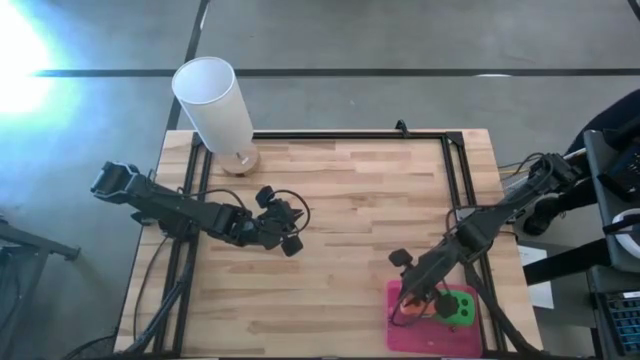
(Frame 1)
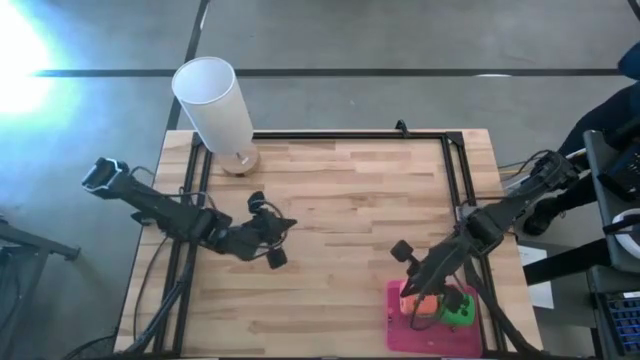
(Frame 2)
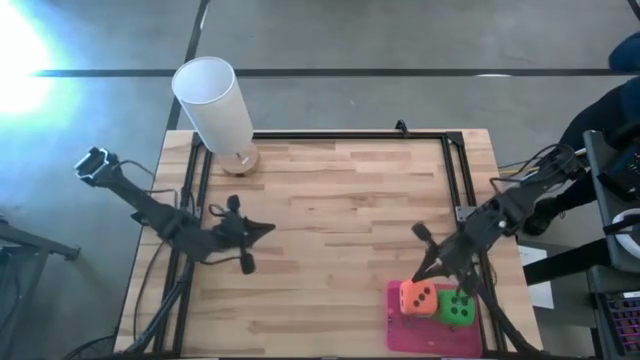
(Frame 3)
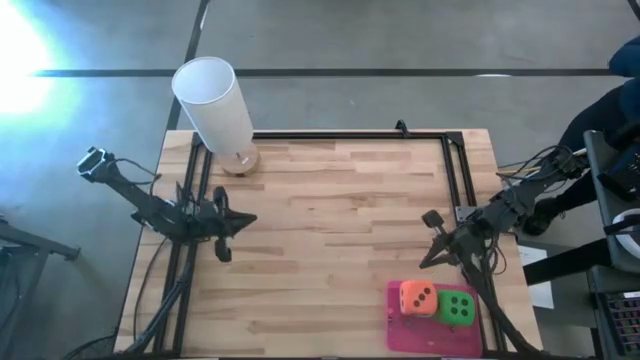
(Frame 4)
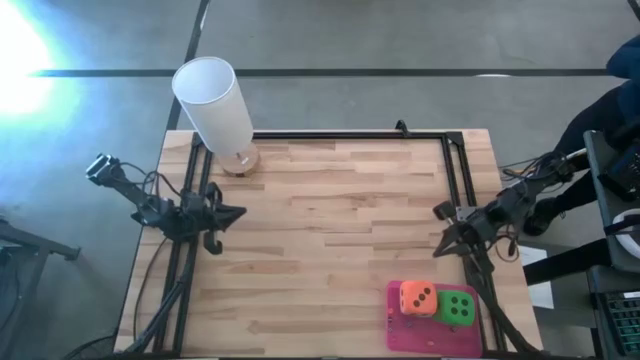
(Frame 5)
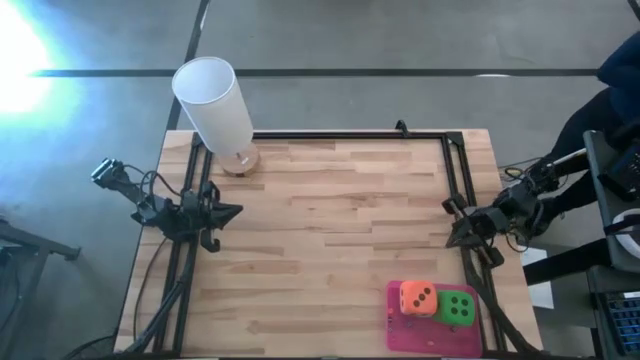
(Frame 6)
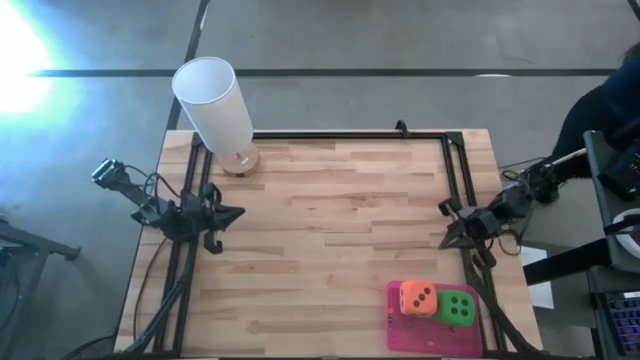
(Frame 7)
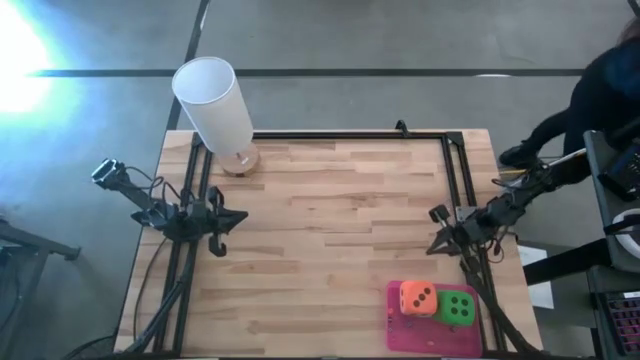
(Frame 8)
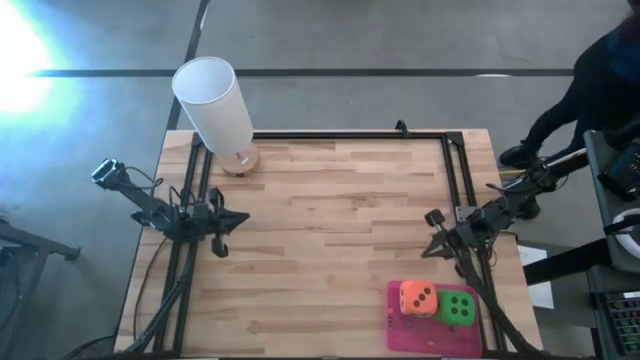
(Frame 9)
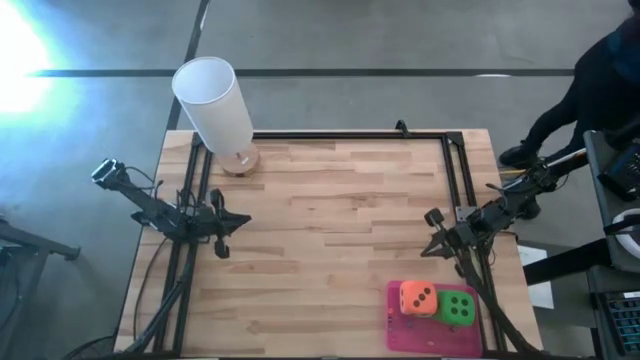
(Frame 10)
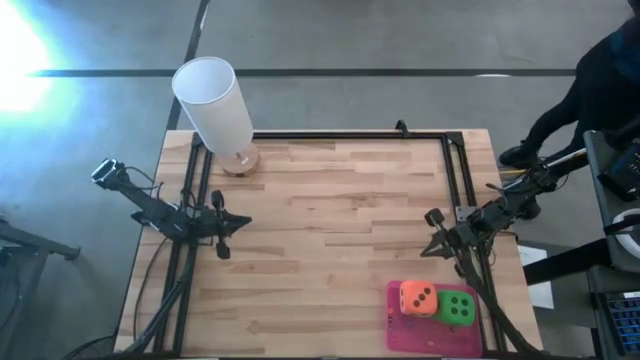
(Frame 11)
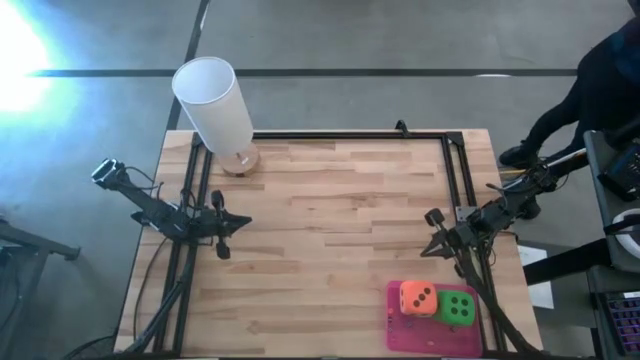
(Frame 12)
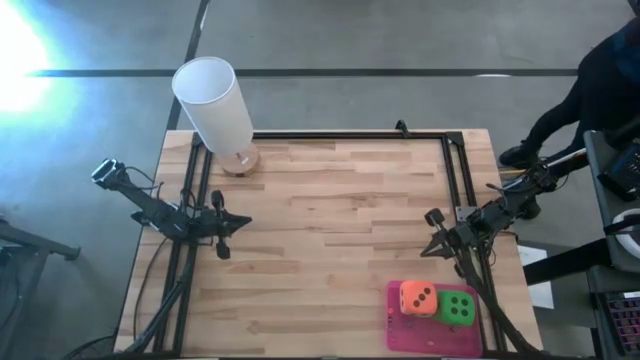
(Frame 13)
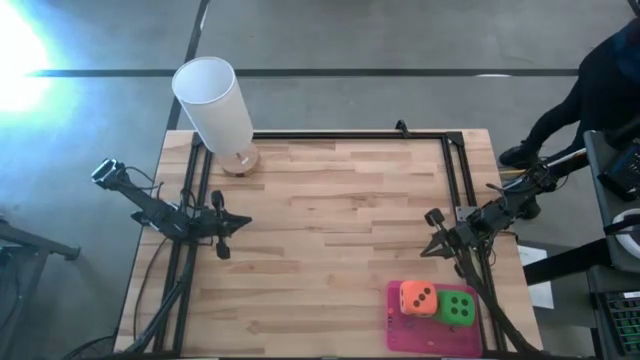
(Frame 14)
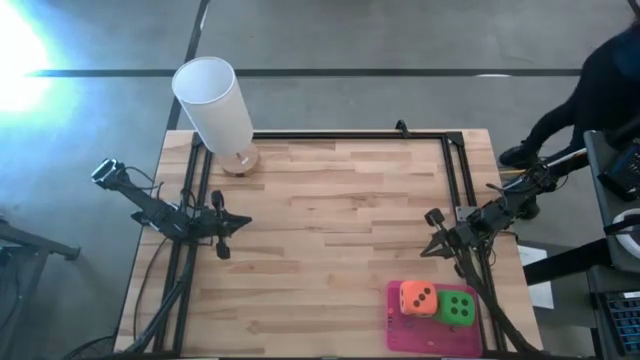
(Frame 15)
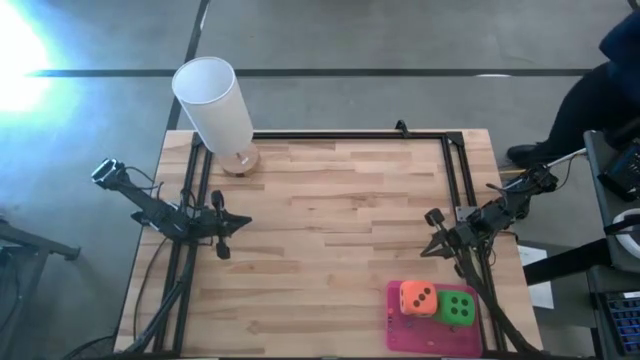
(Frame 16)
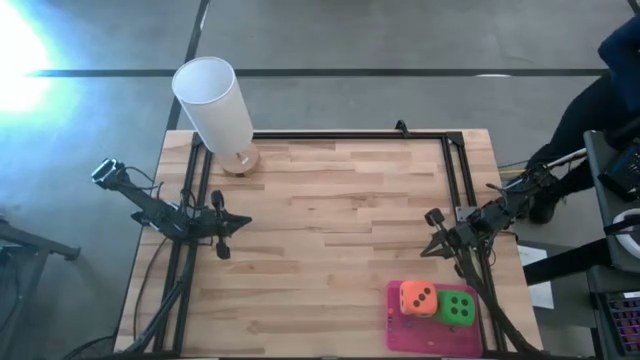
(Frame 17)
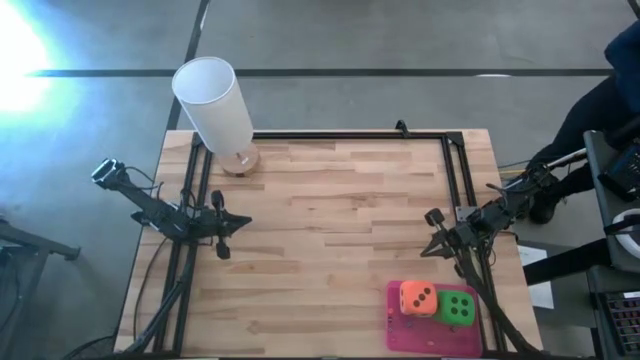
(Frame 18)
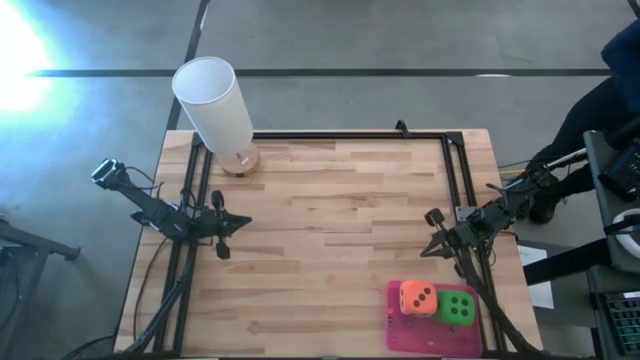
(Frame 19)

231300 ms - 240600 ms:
Task: Pick & Place Dice
Return to Home Position

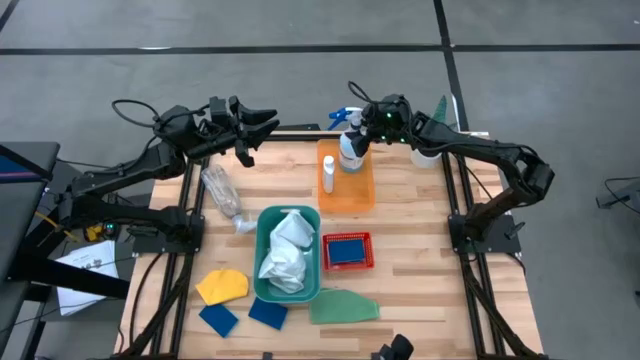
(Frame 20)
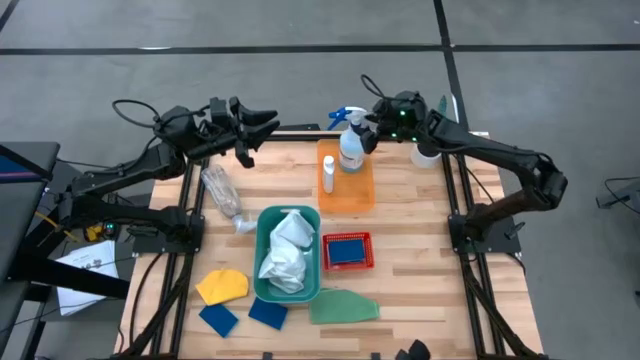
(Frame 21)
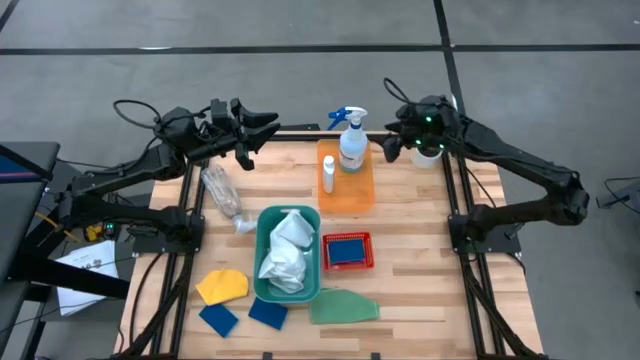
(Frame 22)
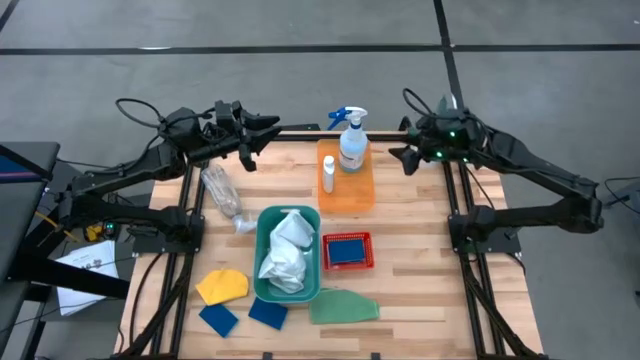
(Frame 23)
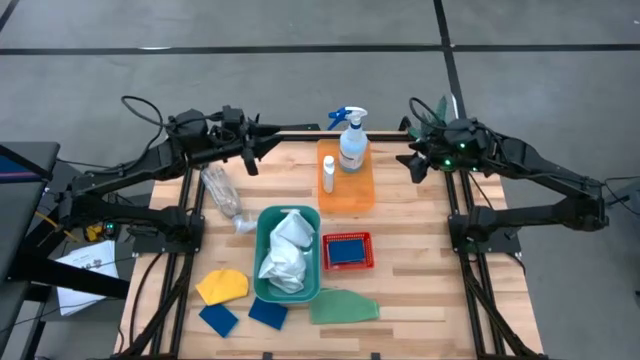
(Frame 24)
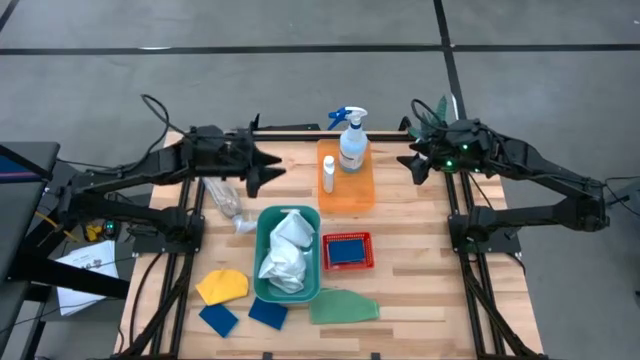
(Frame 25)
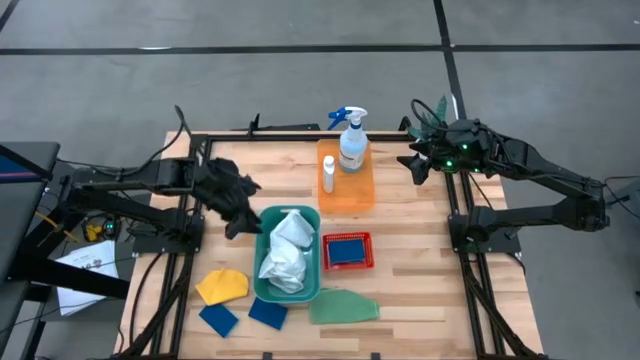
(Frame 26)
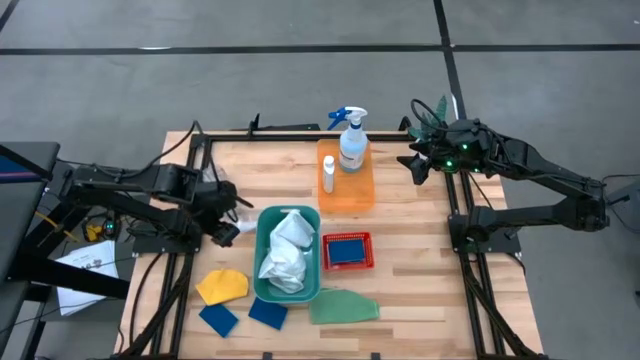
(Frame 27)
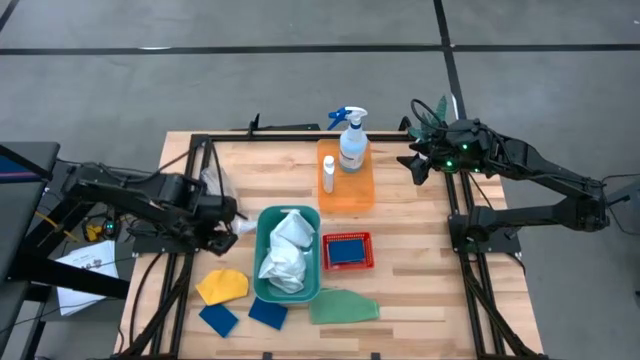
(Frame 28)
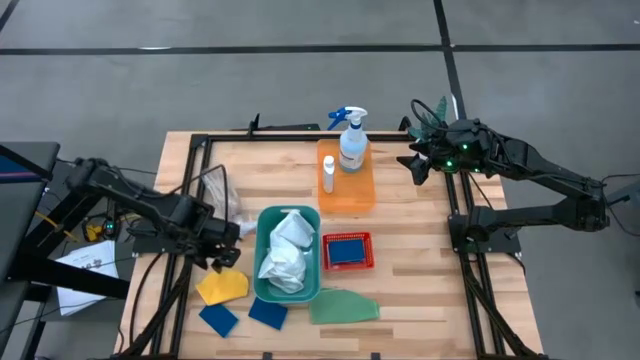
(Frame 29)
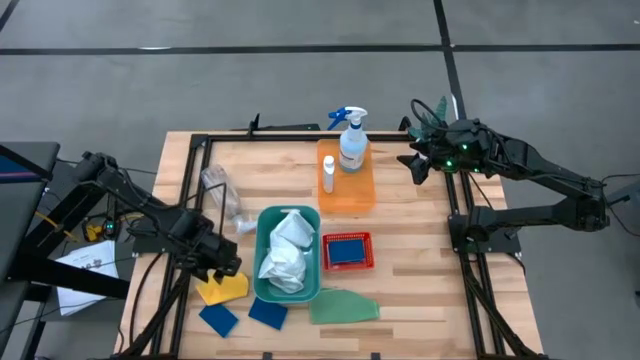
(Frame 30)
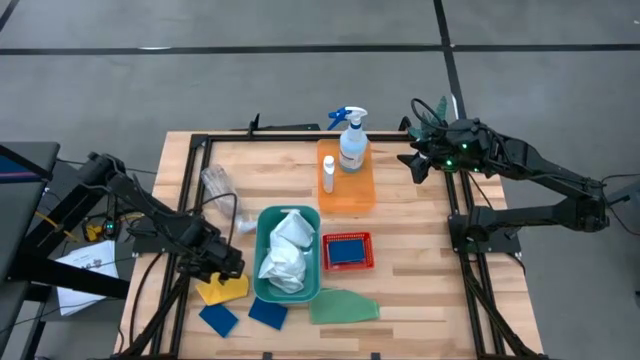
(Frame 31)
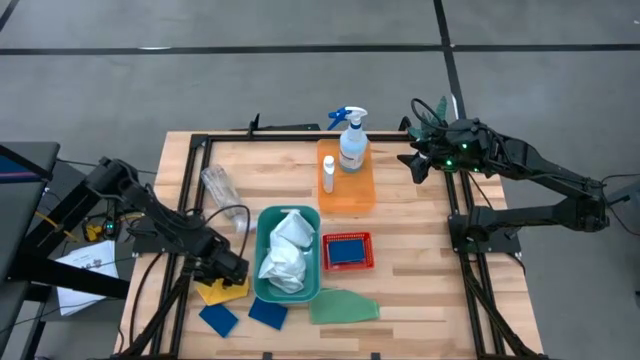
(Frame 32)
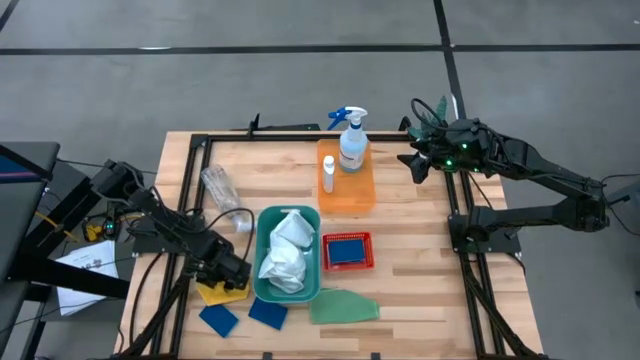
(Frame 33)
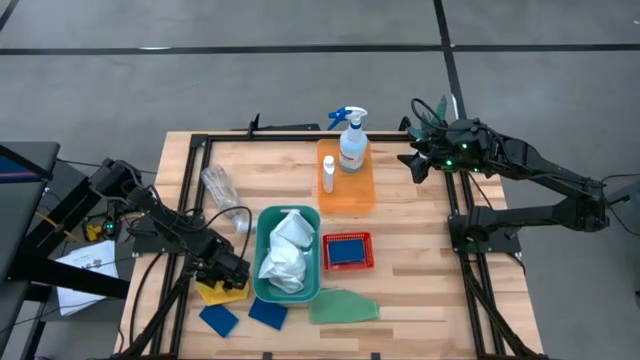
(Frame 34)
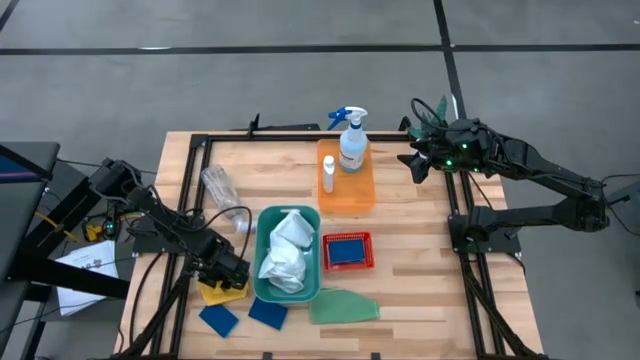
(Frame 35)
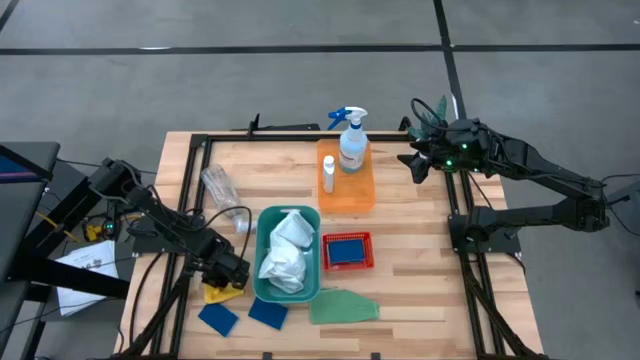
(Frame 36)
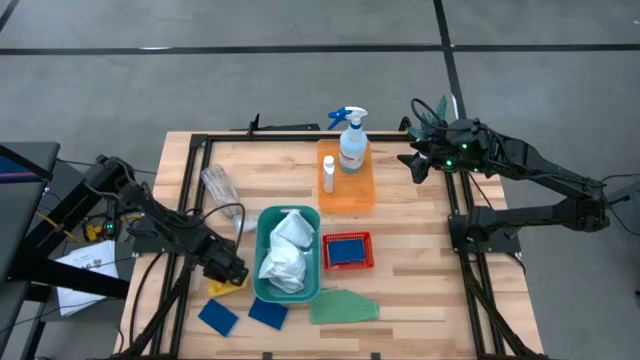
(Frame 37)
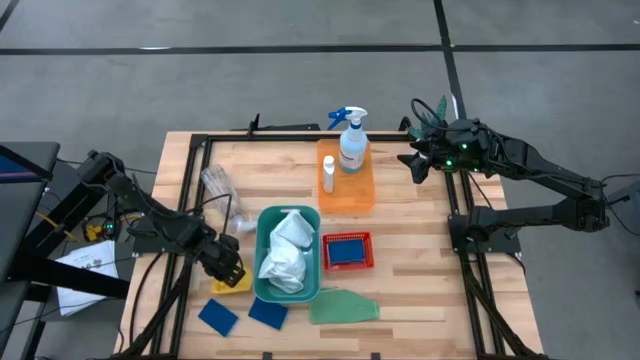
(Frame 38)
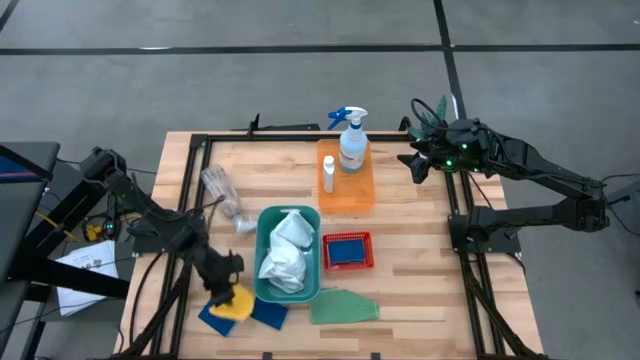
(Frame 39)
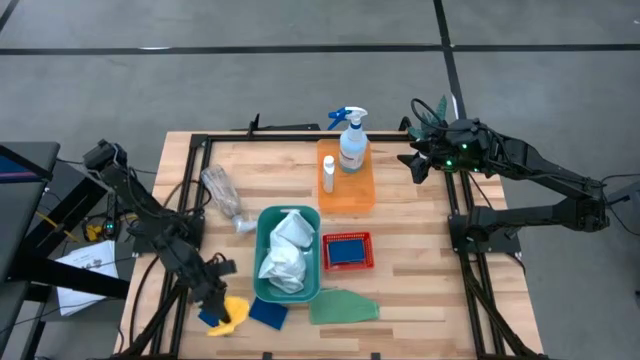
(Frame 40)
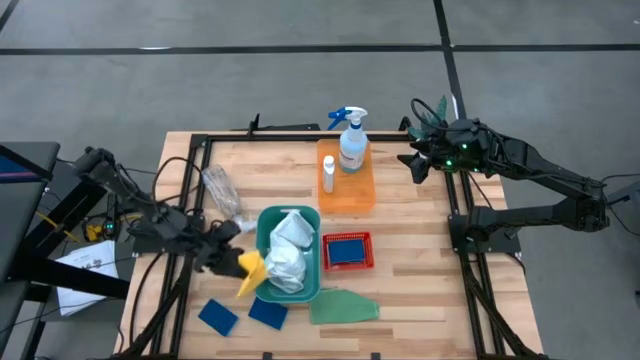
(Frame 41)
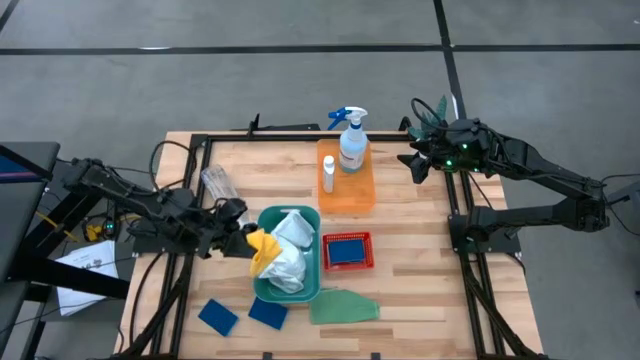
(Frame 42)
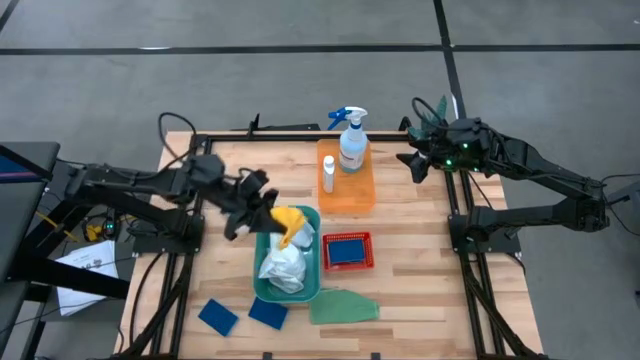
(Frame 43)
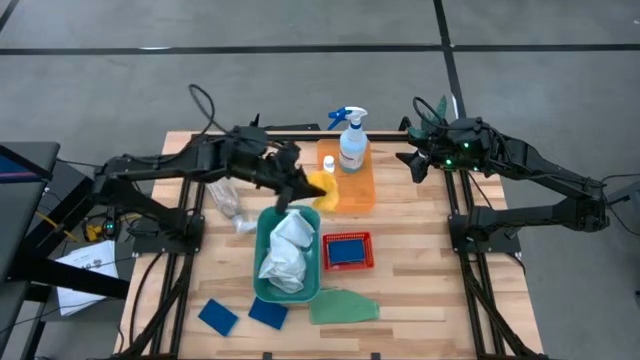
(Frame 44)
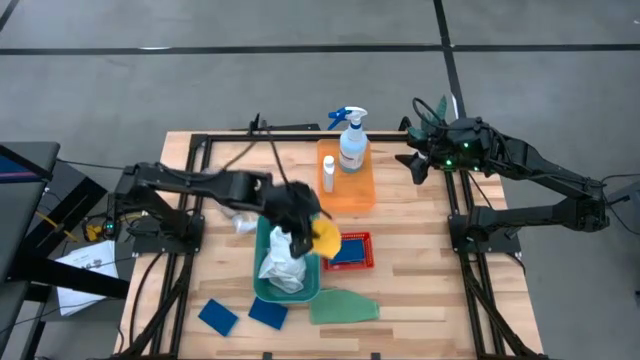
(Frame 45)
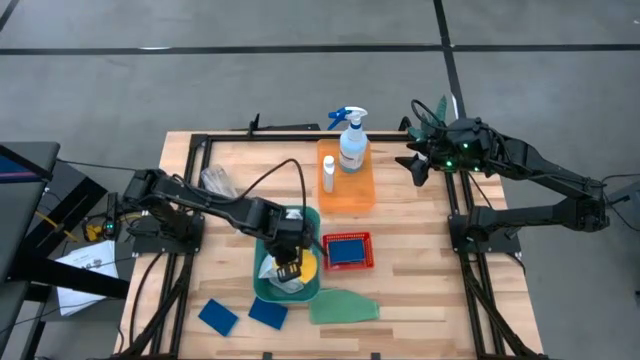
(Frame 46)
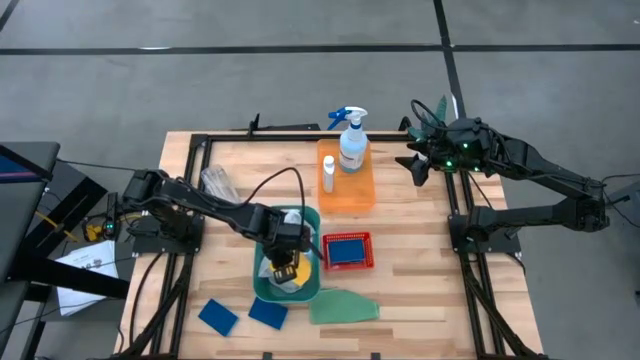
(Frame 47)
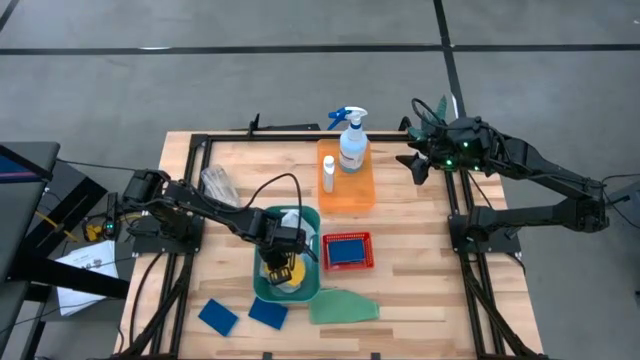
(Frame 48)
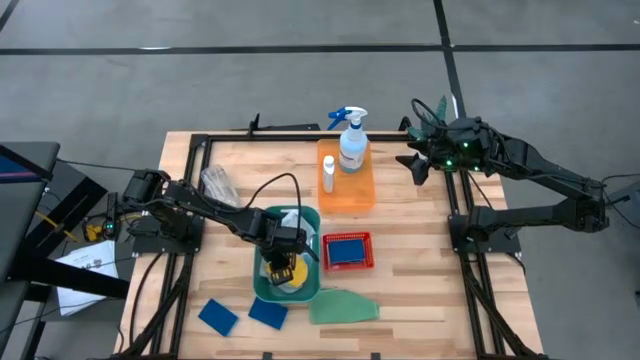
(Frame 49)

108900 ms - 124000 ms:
Task: Pick & Place Kitchen Items
Put the yellow towel into the green bin
